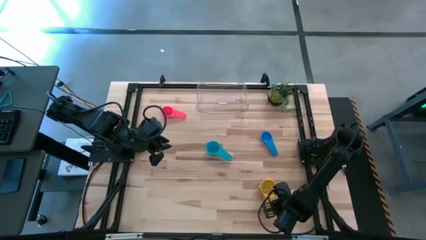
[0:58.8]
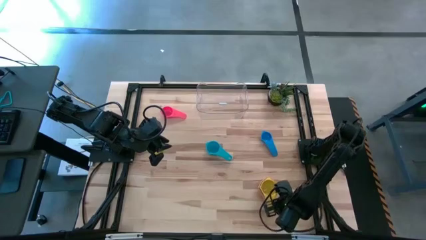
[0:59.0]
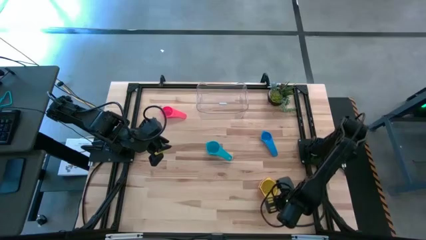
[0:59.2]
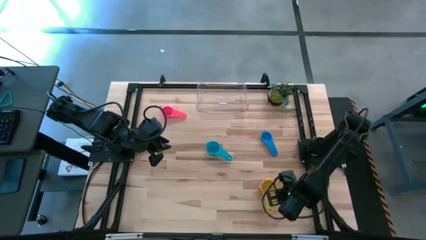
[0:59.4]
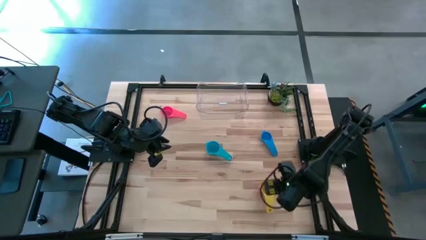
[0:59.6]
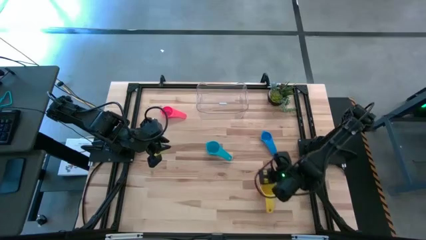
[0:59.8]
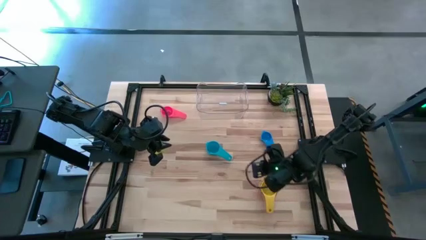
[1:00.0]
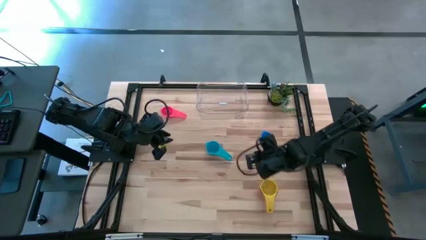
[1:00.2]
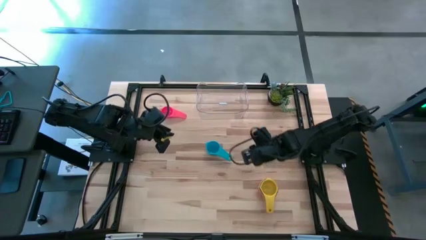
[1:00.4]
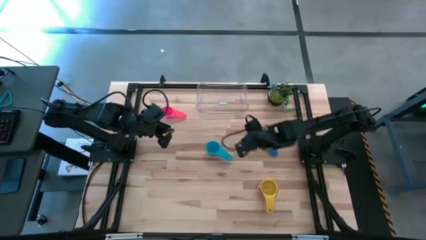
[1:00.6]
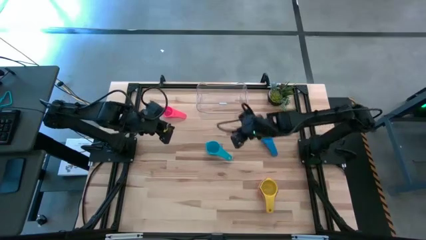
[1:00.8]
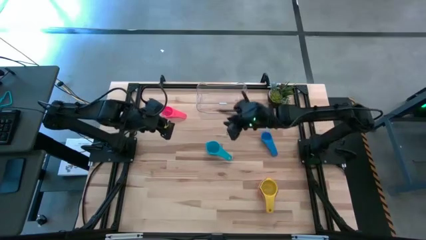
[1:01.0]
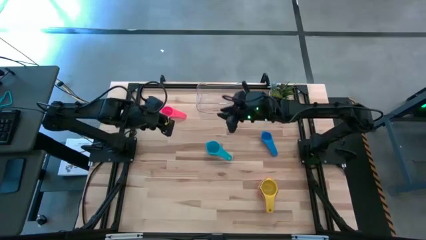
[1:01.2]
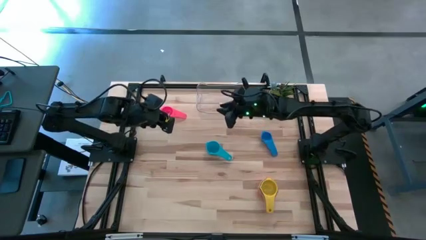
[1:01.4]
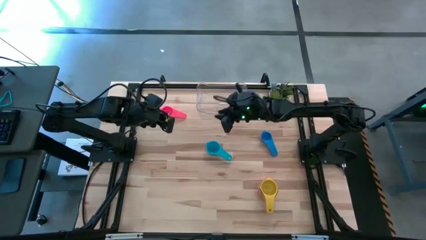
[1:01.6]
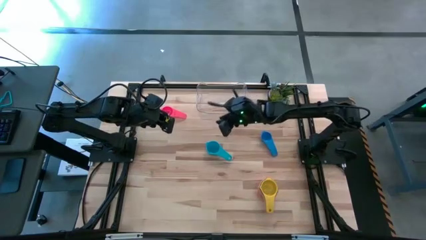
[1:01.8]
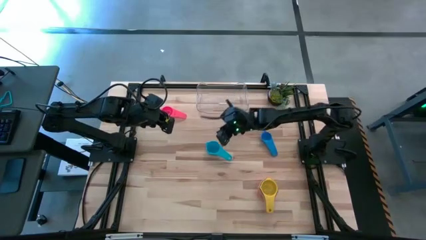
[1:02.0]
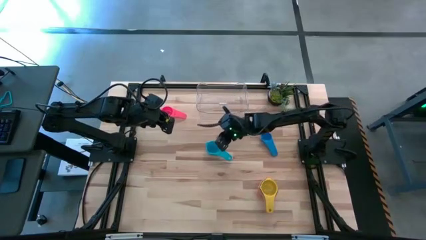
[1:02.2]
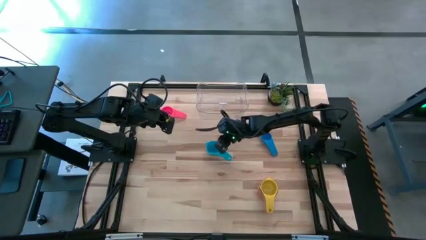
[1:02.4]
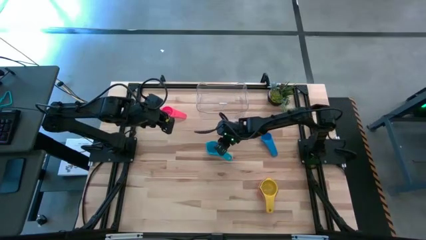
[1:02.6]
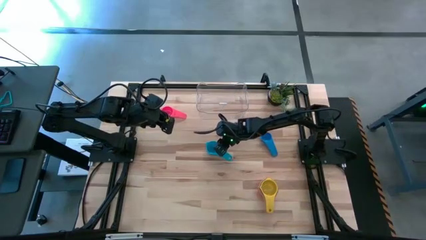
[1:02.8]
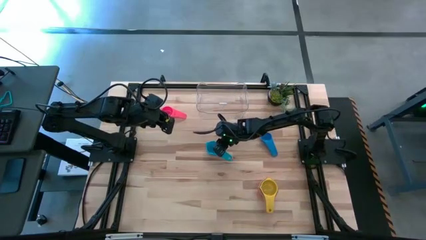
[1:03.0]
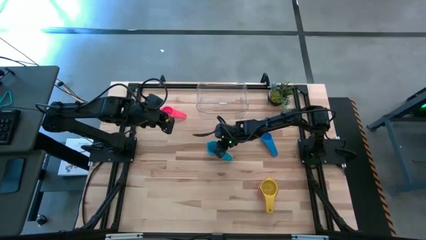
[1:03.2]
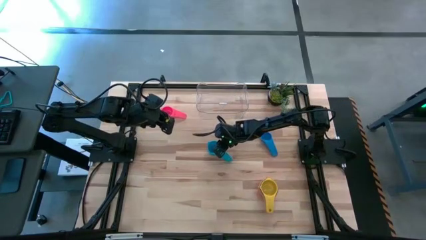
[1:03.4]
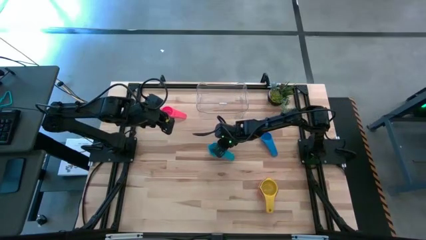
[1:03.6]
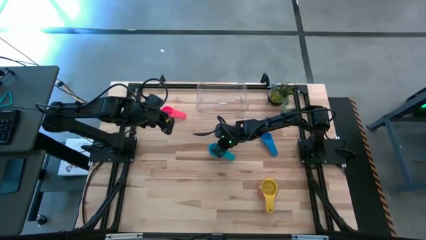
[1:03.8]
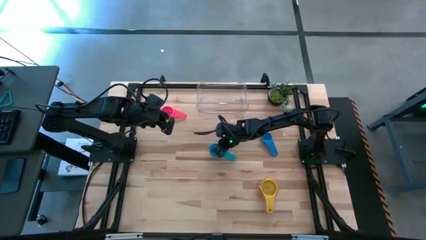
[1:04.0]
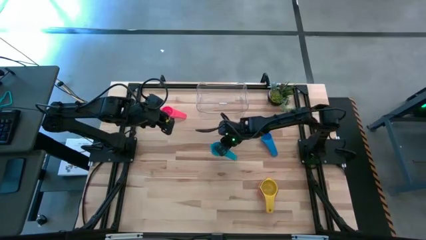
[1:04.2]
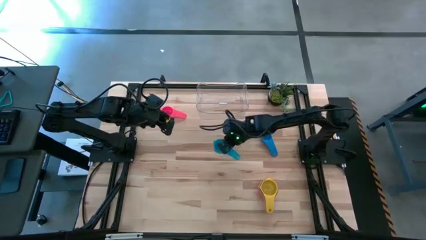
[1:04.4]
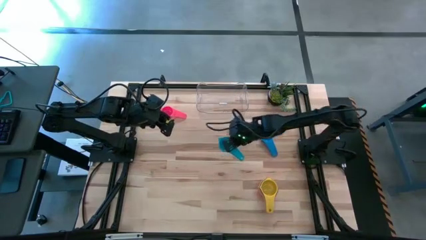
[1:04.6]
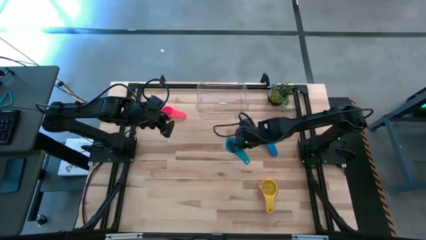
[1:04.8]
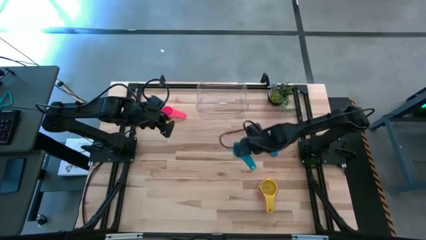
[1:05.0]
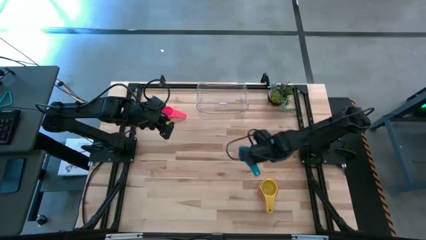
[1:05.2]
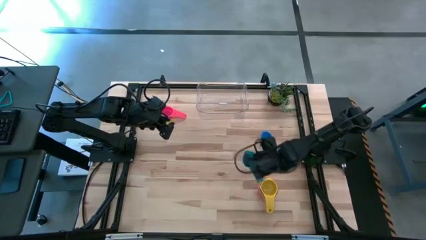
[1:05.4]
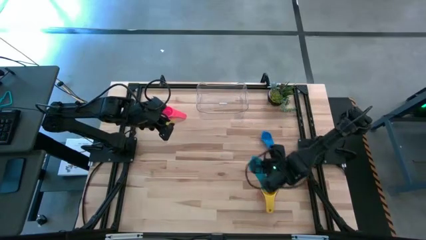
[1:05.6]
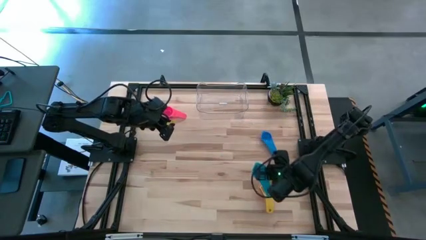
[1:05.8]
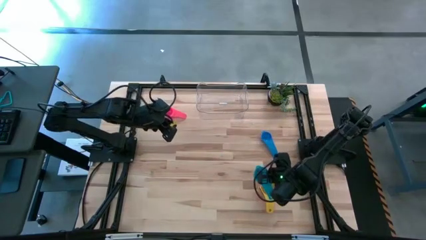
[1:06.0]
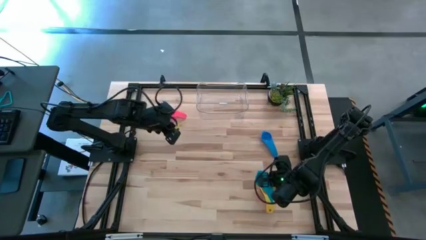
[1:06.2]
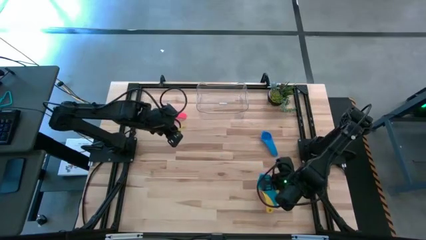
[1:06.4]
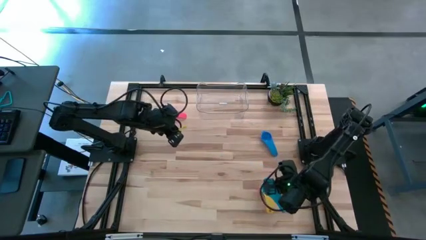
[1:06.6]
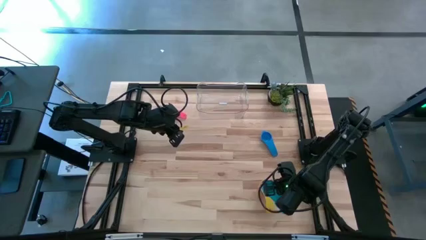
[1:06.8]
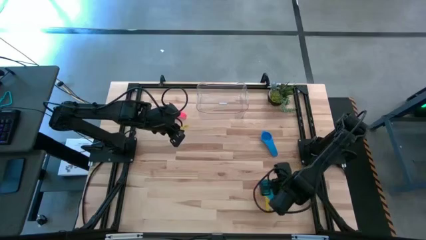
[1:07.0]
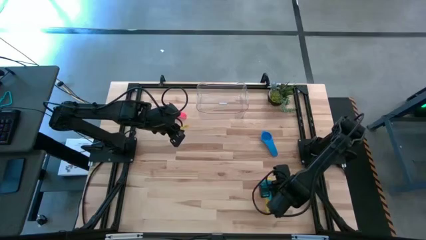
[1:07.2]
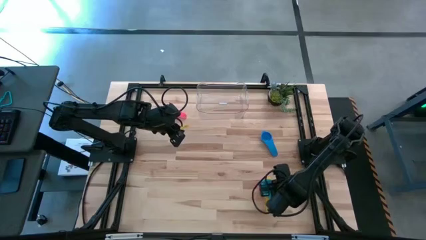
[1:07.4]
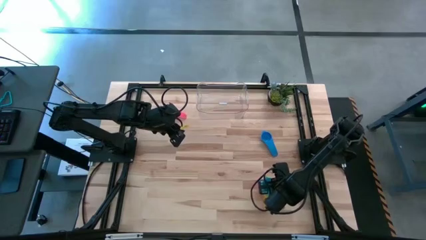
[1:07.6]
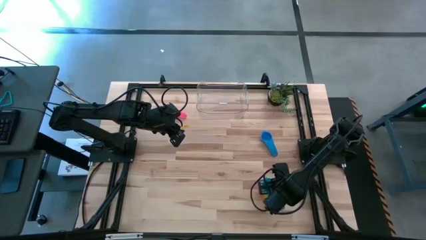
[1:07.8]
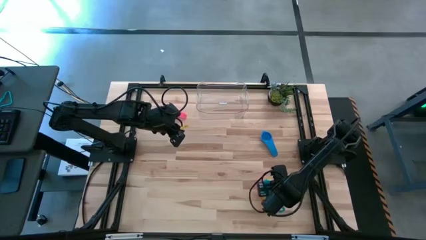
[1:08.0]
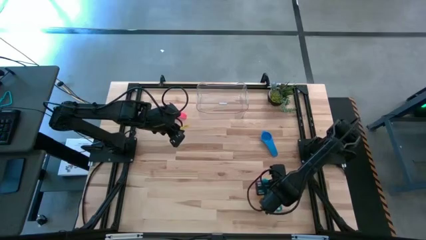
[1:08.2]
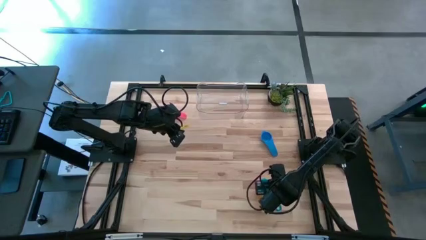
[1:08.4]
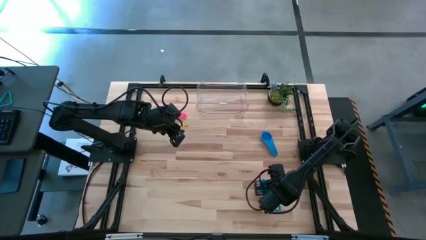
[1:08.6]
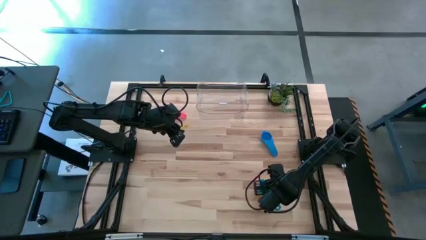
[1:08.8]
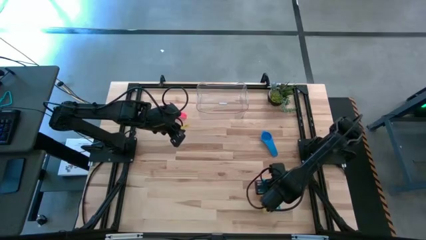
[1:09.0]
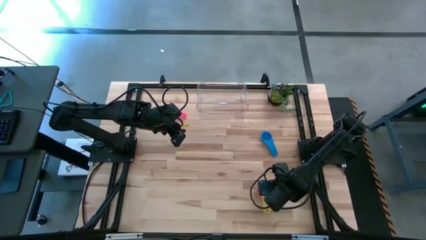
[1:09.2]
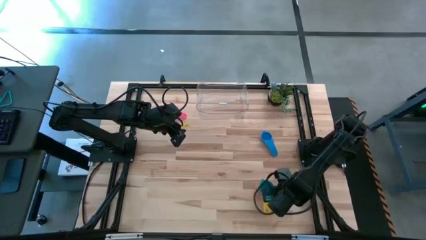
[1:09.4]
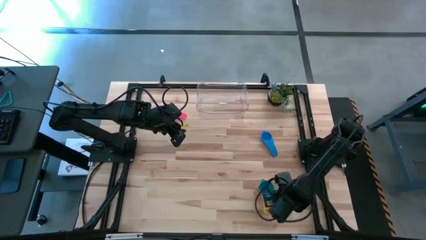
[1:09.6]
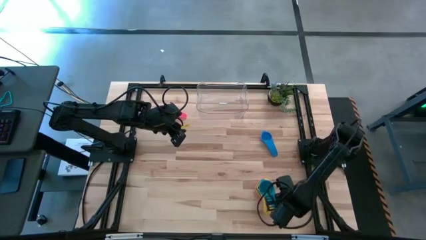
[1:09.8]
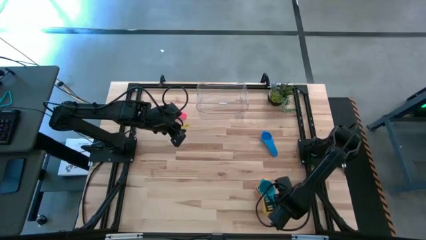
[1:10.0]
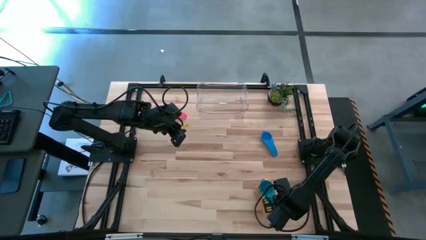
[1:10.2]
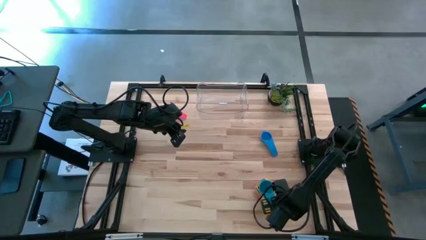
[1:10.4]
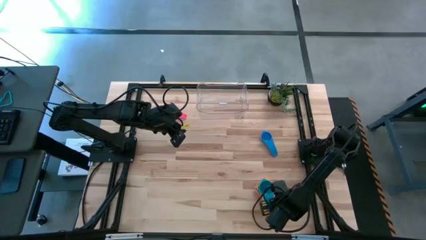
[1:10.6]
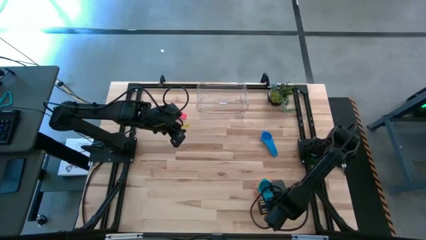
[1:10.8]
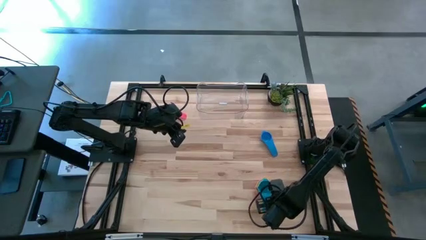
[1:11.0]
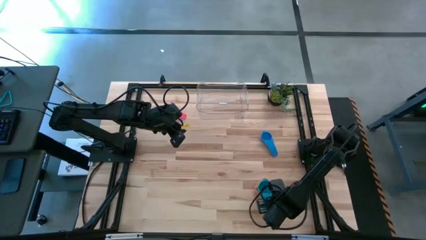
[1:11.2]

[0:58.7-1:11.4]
Task: Nest measuring cups in basket
Stack the sky blue measuring cup on top of the yellow measuring cup

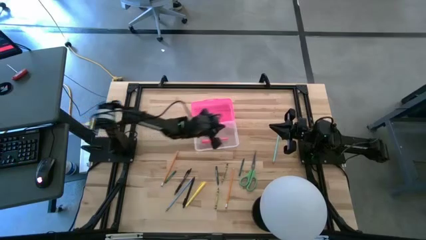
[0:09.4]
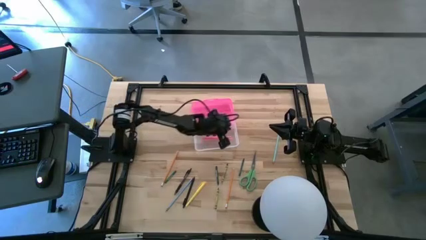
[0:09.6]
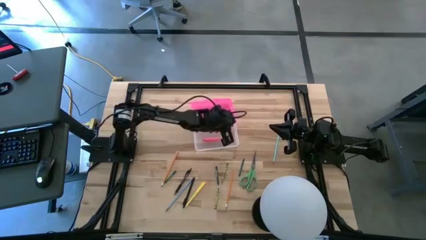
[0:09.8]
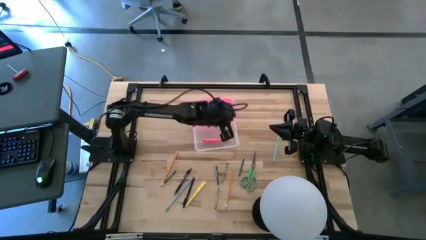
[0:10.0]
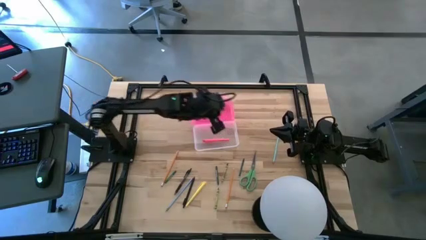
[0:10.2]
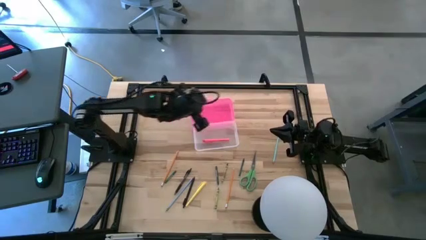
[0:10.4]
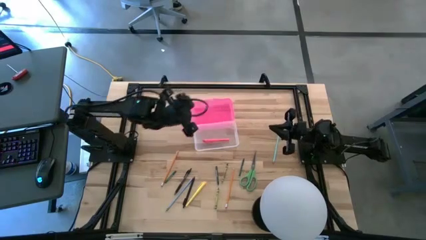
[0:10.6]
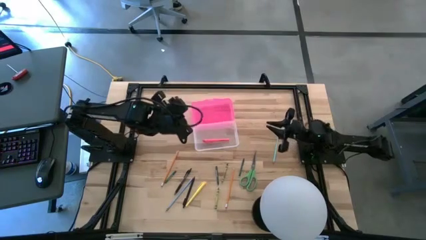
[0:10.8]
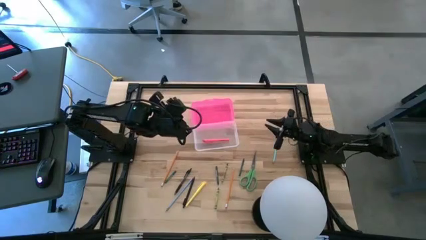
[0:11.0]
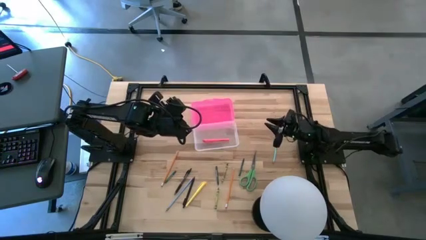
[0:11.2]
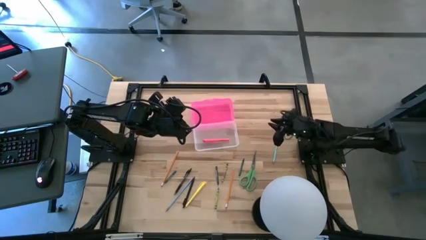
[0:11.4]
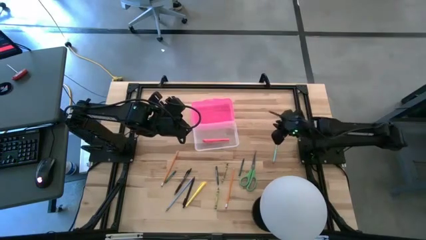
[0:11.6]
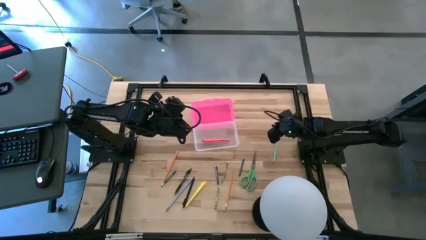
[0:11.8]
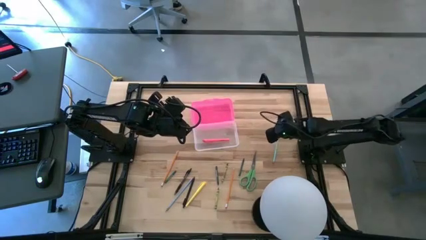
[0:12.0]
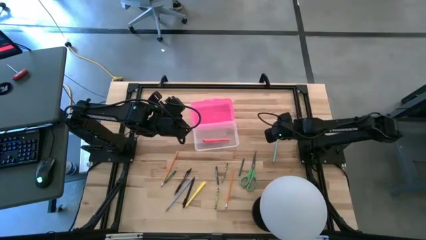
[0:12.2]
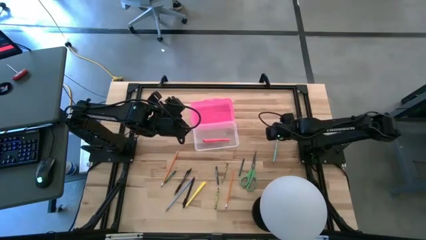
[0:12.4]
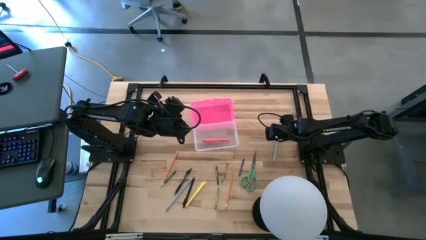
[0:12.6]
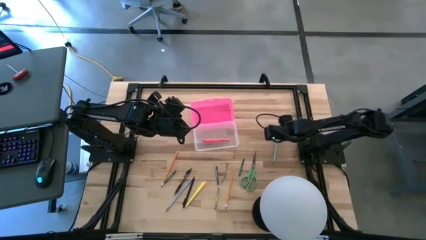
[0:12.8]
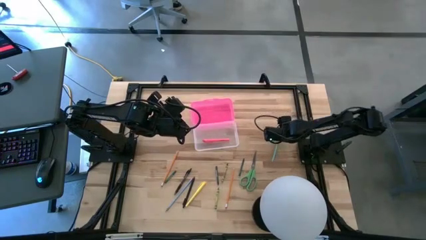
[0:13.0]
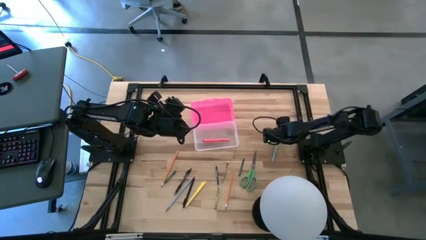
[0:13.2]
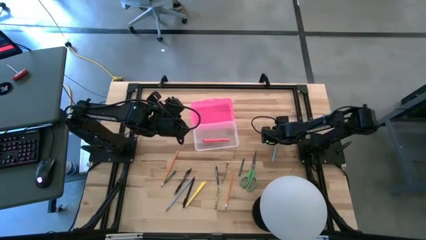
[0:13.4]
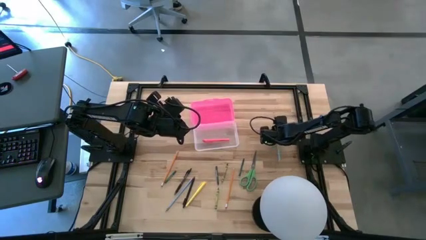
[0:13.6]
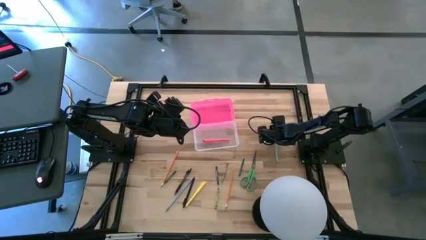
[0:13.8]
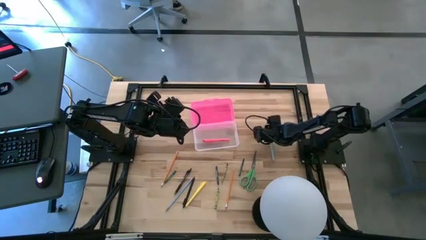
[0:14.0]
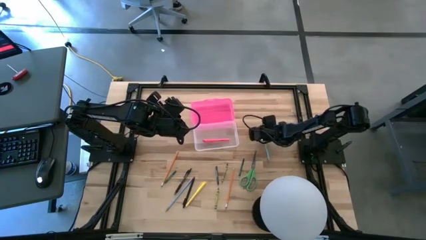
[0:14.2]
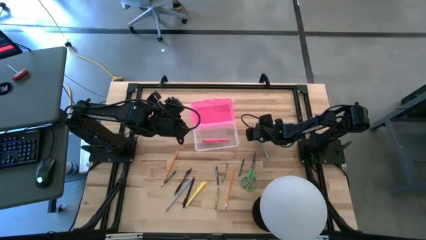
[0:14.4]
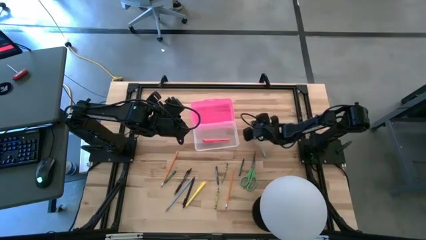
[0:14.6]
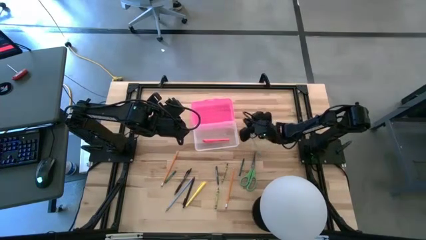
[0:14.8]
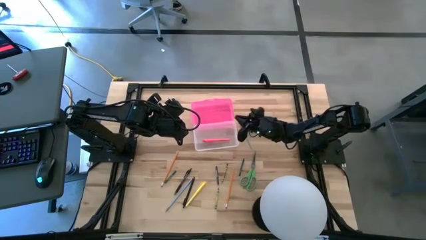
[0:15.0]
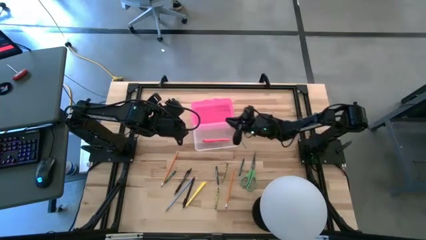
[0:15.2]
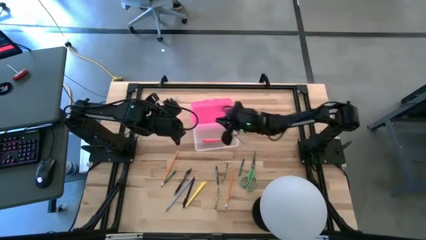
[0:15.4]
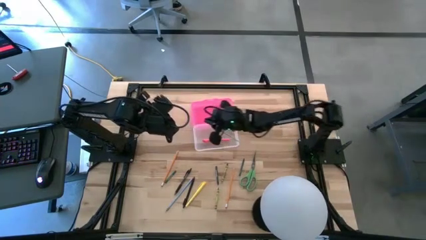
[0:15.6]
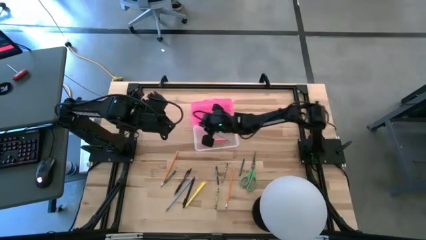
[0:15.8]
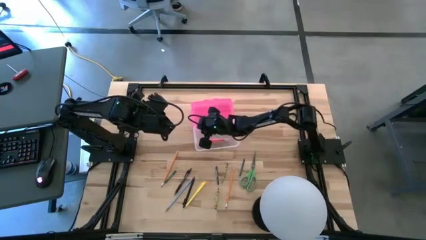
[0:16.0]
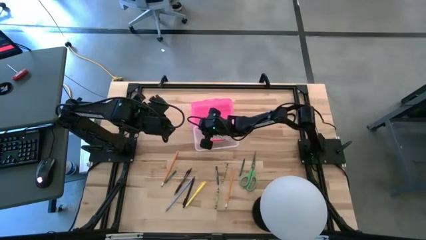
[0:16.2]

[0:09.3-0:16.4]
Task: Pick & place school supplies into a supply box
Put the light blue pencil into the pink supply box
